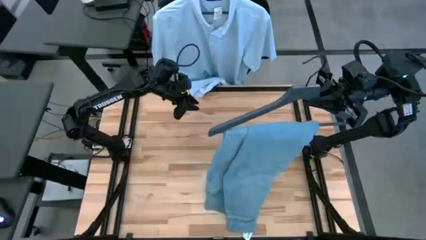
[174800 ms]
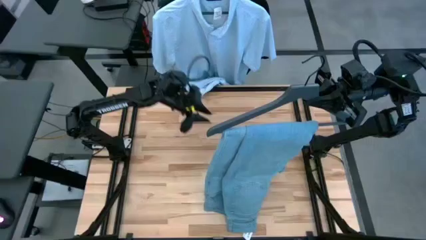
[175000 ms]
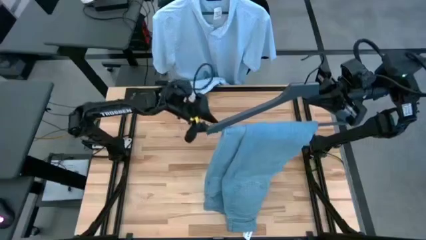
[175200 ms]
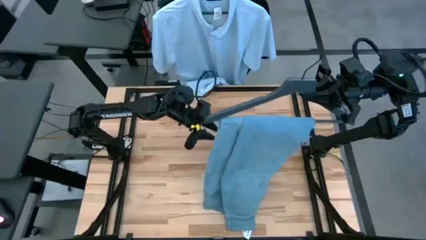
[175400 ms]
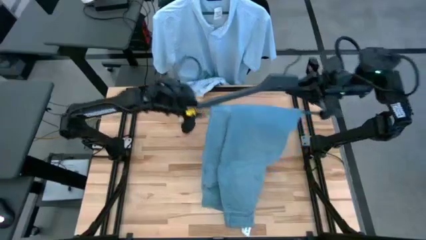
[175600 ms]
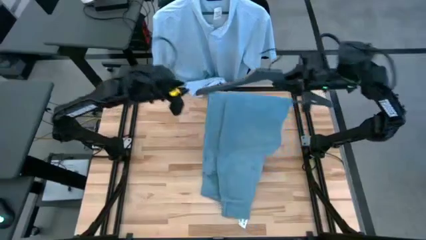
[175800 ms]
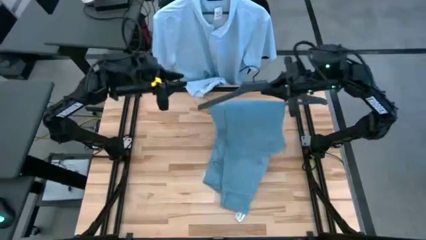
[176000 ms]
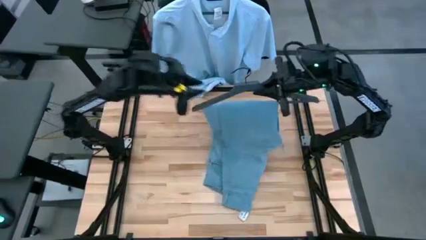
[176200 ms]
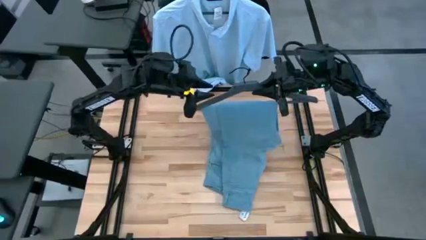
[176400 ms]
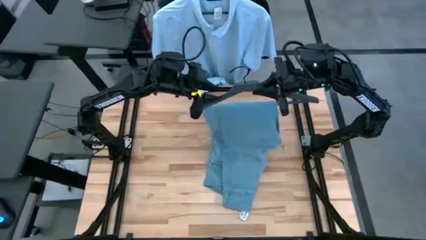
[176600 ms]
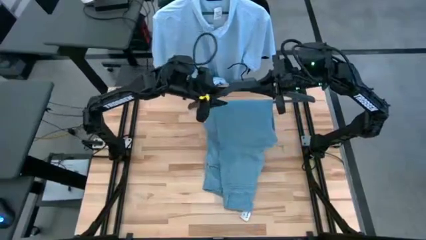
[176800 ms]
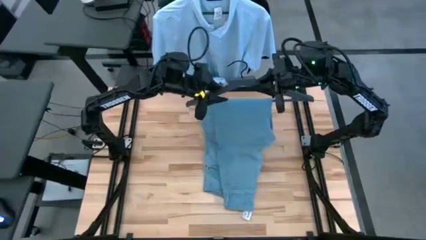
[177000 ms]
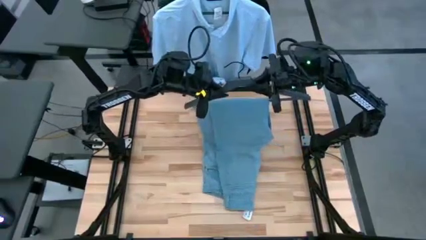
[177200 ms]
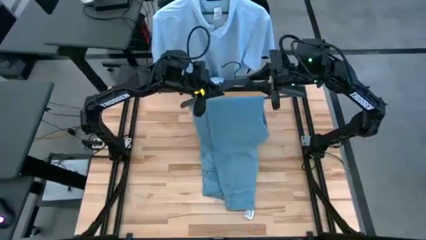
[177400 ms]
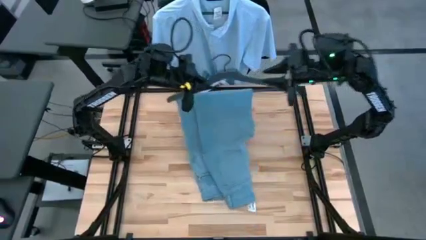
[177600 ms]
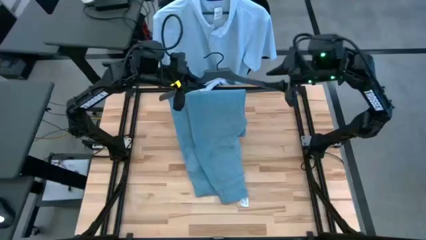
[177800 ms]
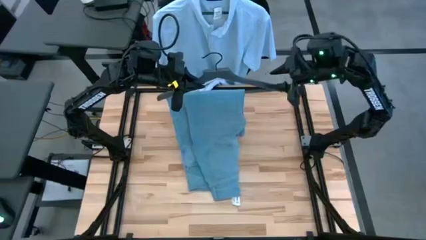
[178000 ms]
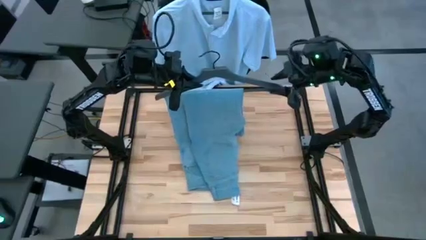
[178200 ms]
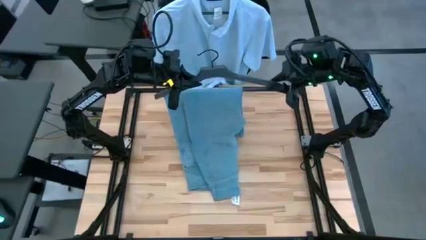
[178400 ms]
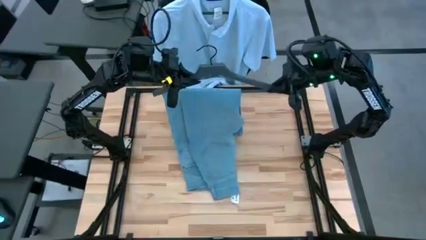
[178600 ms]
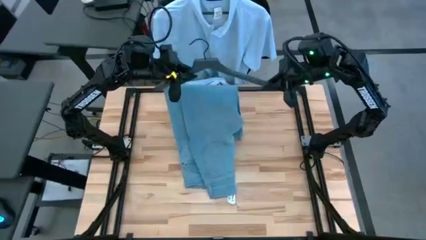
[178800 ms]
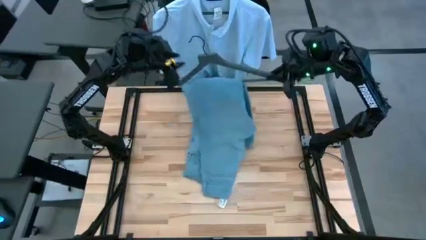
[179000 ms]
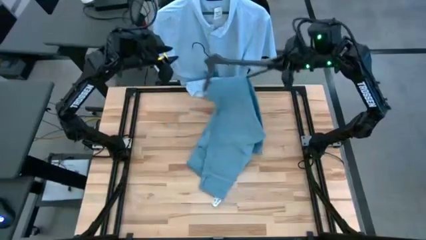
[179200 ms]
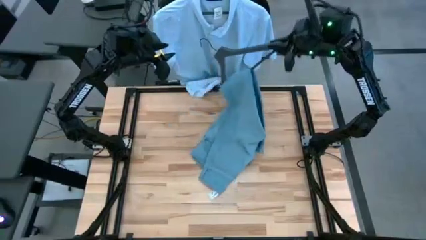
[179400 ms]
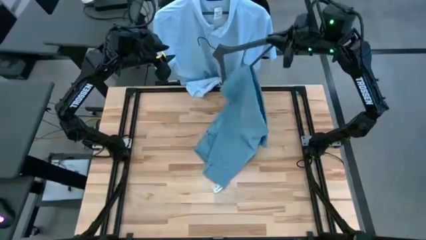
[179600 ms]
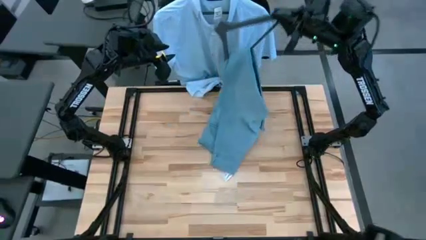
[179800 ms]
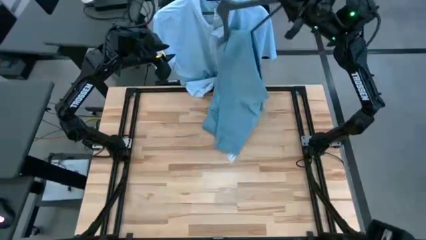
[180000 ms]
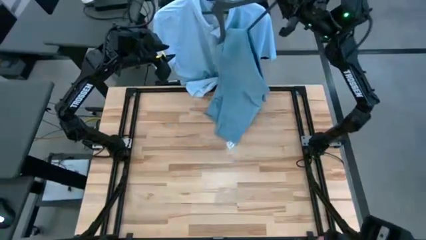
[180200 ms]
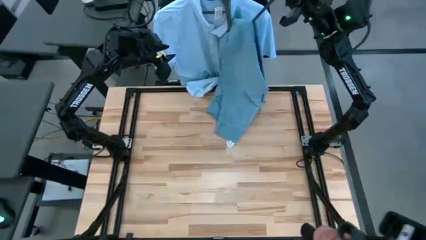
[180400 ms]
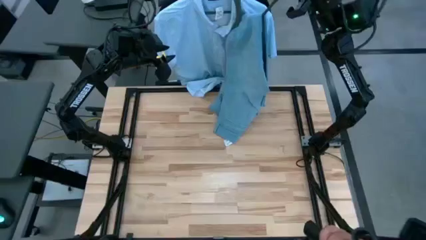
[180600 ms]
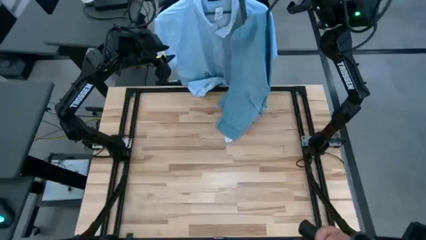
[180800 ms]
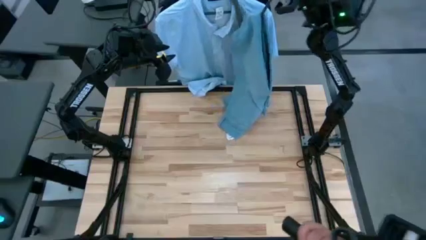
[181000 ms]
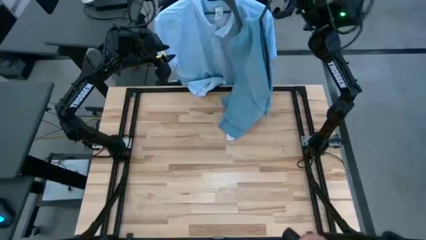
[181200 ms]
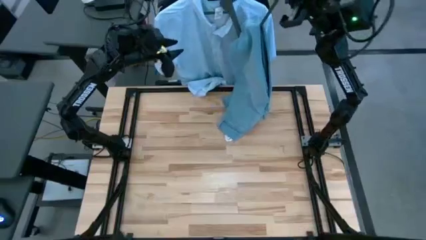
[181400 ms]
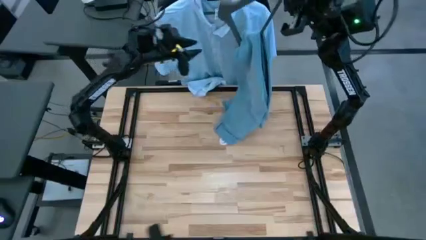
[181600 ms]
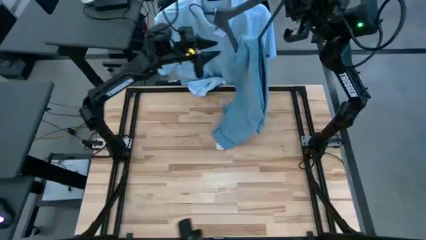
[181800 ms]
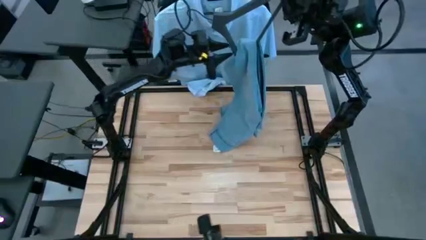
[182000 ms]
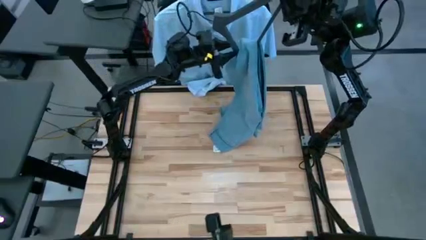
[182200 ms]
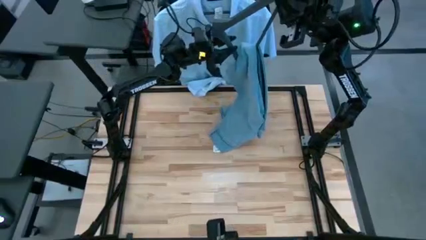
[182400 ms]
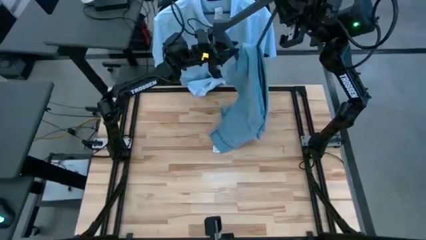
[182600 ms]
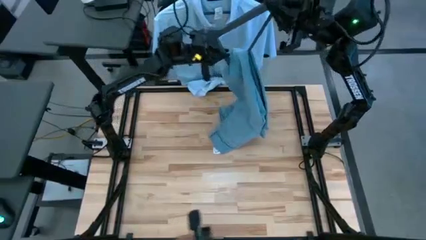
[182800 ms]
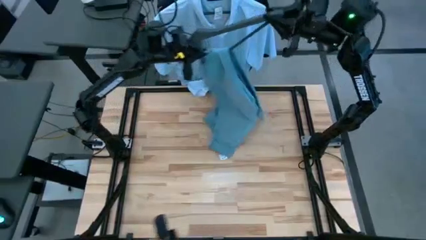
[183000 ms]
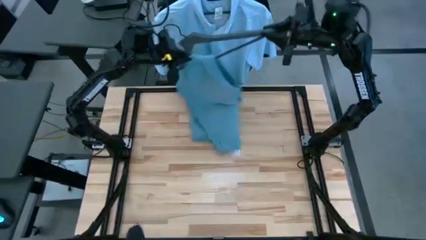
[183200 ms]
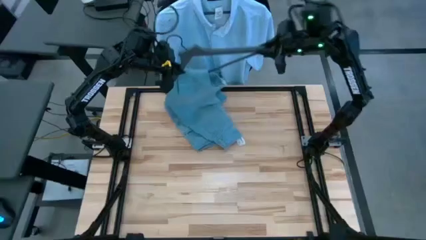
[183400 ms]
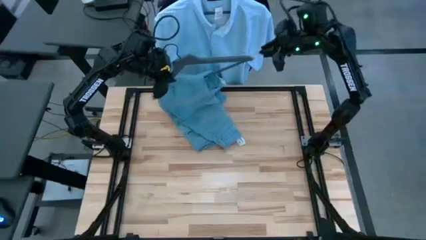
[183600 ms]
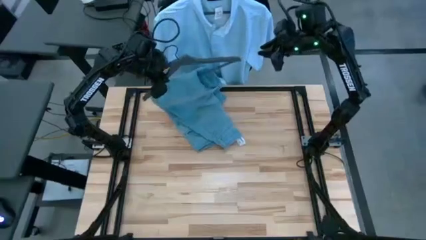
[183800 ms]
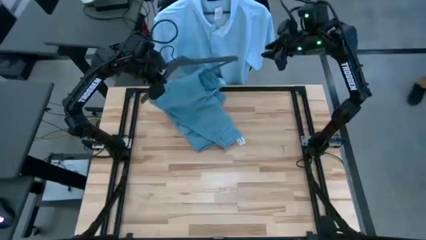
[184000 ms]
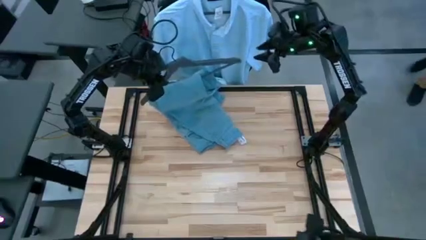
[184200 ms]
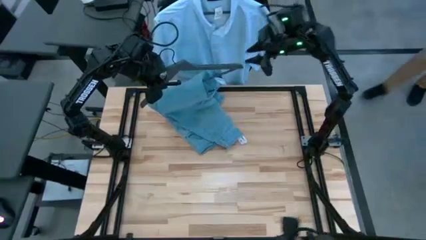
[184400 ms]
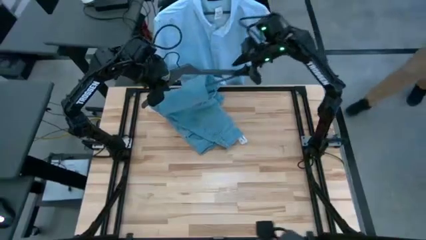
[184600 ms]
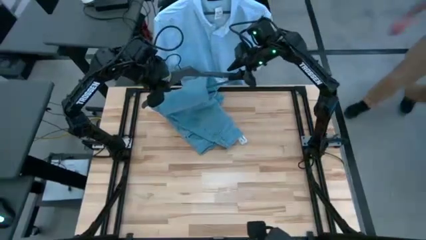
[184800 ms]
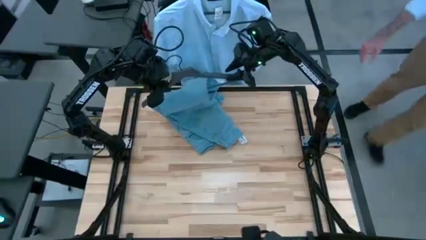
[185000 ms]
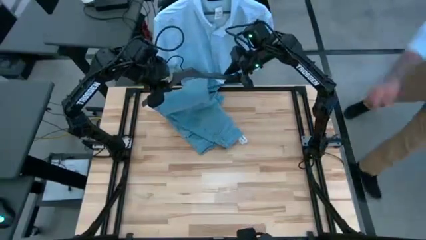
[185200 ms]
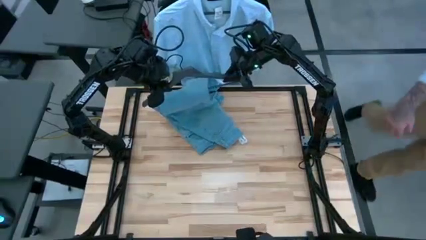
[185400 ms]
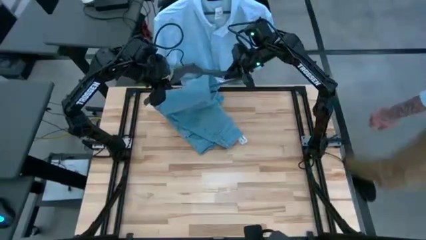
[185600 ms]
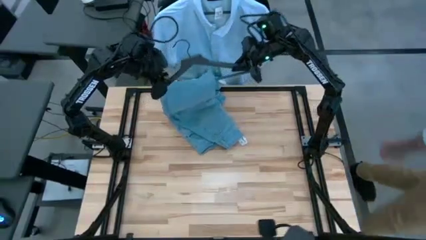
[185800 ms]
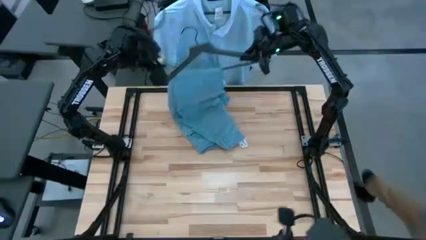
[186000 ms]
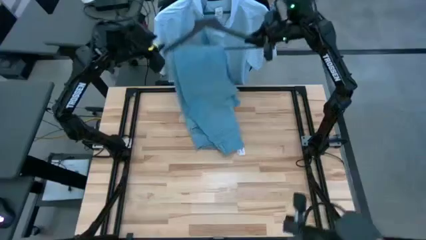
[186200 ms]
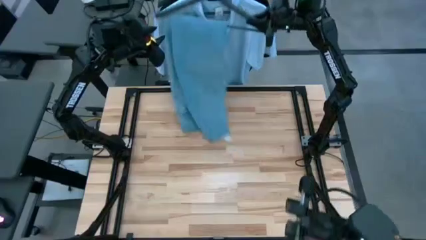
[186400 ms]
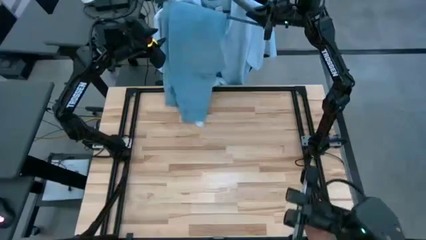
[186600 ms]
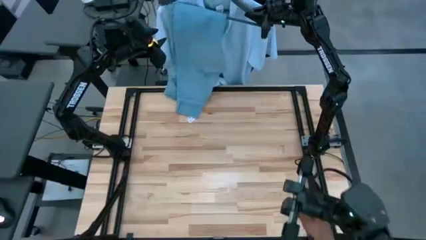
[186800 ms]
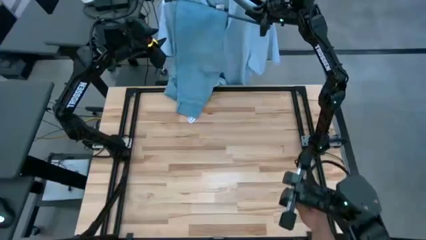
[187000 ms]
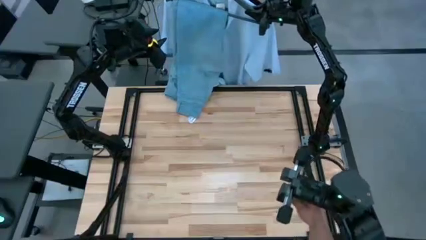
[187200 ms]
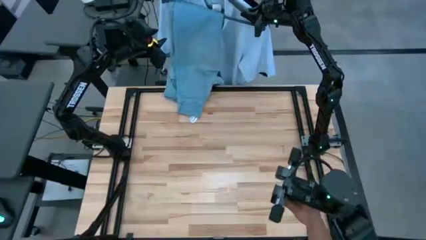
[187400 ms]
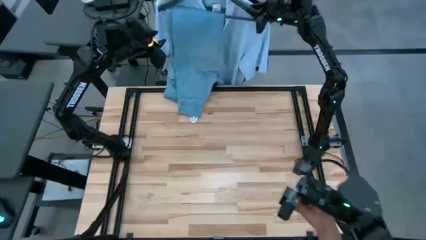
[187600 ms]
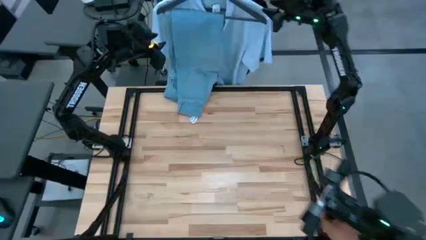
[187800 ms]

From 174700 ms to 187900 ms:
Task: Hang clothes
Hang the blue jeans on the rack

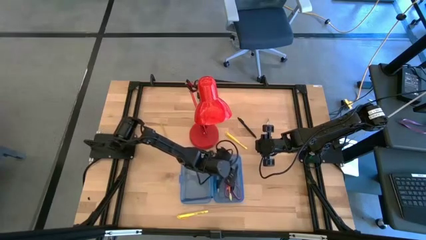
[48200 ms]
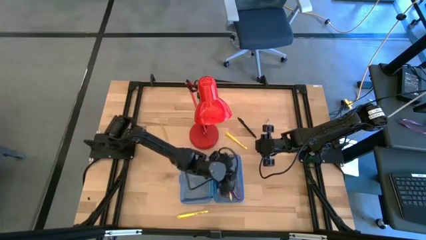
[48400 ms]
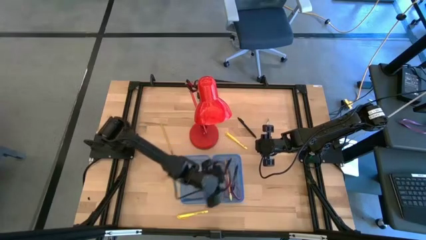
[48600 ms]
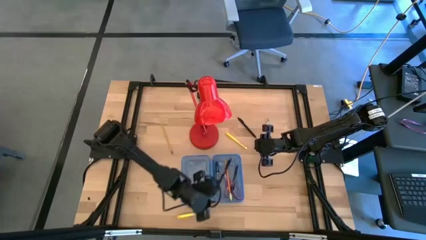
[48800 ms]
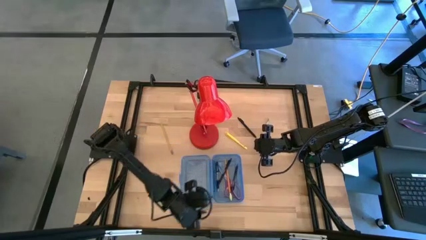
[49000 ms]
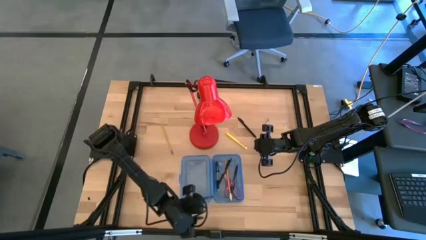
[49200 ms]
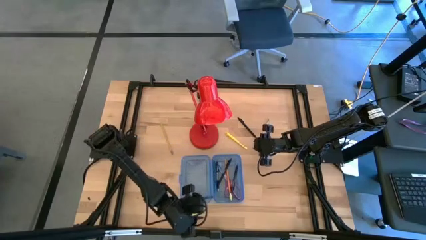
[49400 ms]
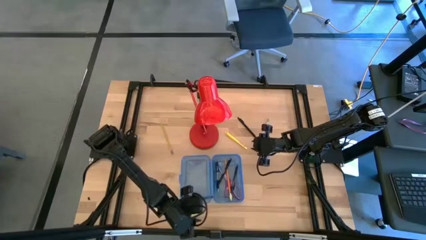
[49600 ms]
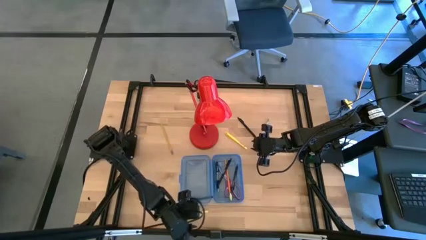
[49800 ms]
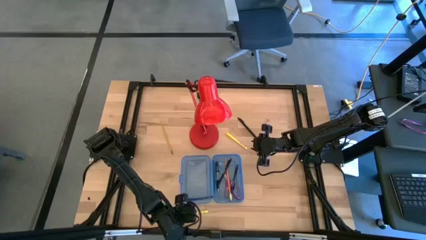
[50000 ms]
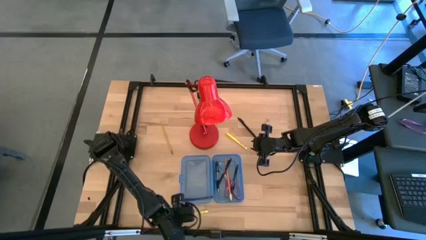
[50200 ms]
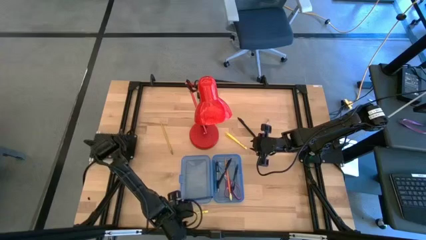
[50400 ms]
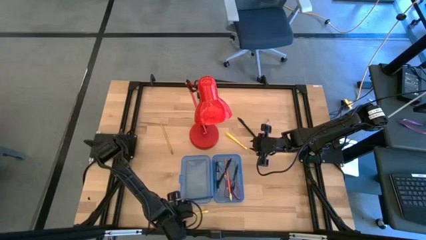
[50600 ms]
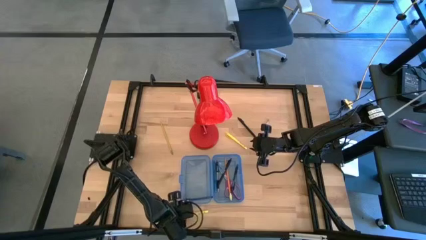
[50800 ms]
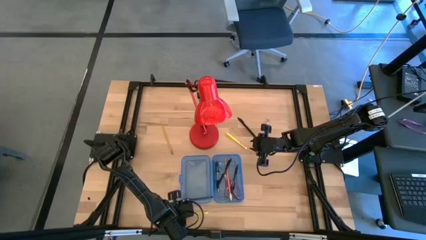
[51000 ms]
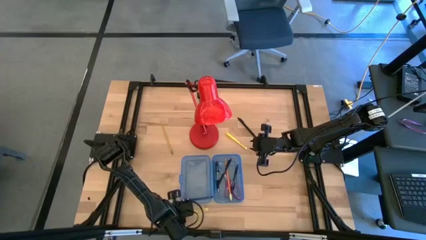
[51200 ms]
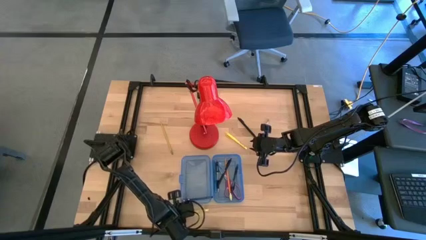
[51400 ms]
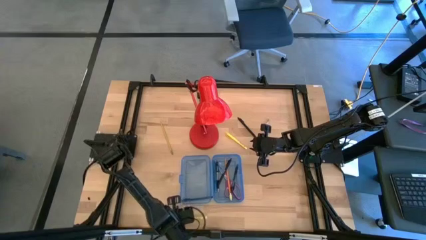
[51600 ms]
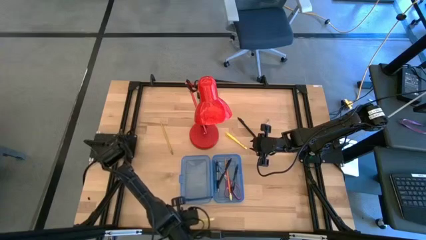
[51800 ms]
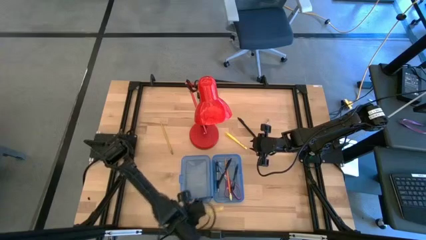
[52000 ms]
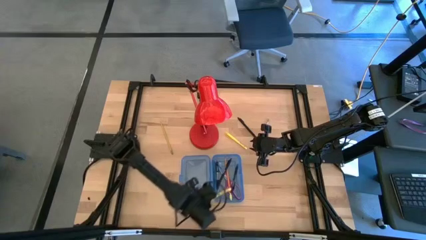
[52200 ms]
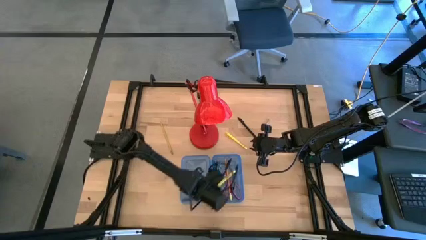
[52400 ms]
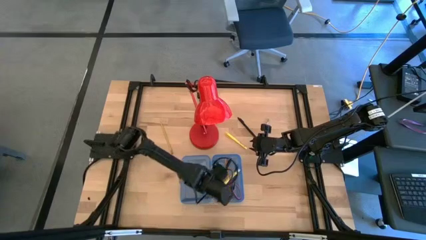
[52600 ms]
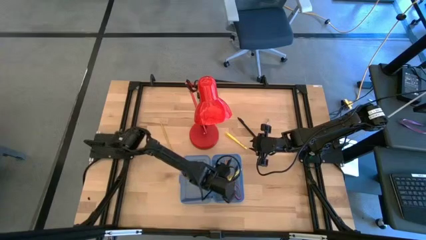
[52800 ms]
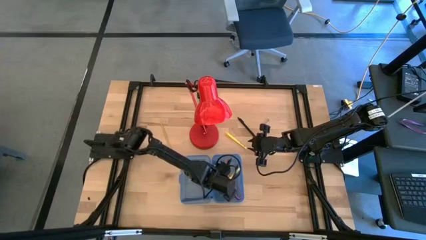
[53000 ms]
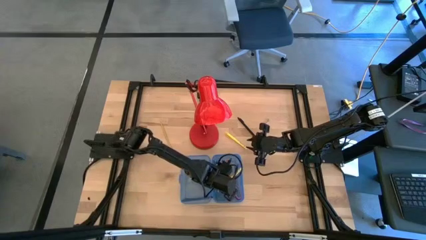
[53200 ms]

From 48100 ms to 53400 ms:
Task: Pick & place school supplies into a supply box
Put the bottom yellow pen into the blue supply box
